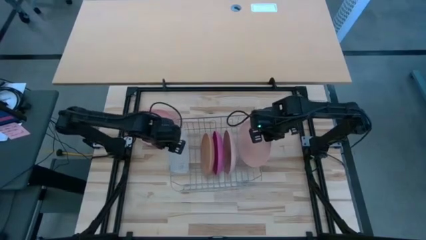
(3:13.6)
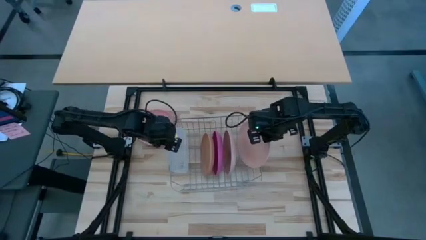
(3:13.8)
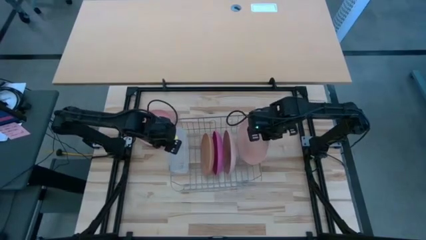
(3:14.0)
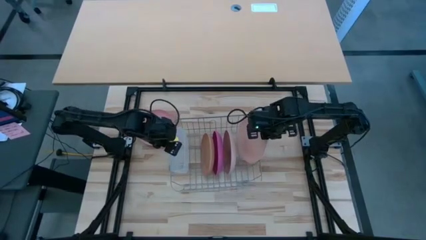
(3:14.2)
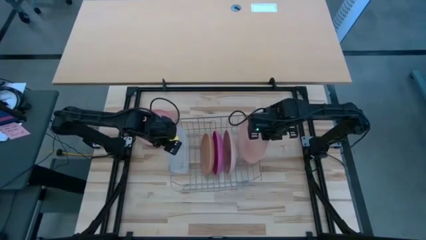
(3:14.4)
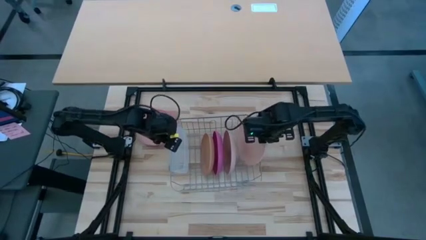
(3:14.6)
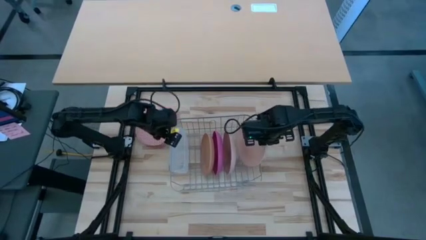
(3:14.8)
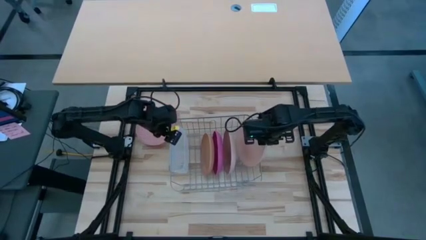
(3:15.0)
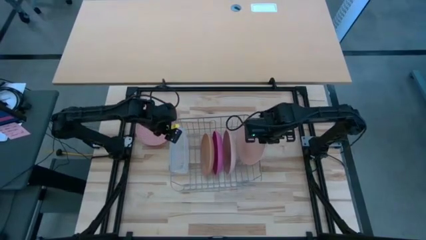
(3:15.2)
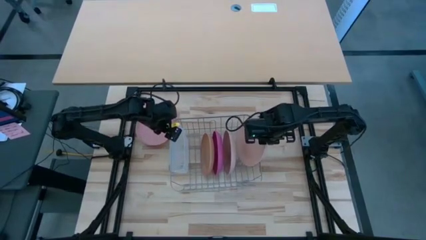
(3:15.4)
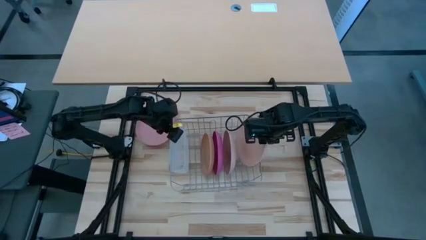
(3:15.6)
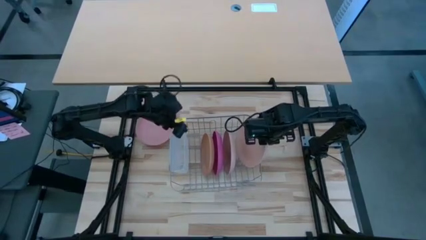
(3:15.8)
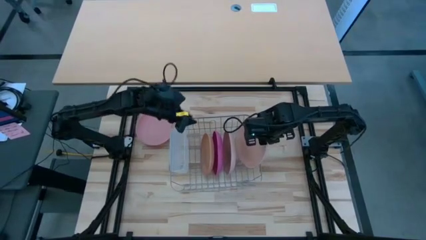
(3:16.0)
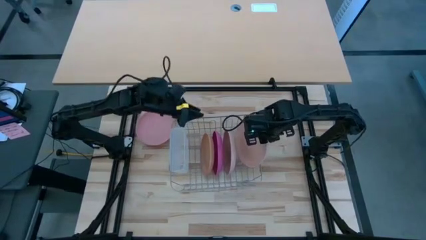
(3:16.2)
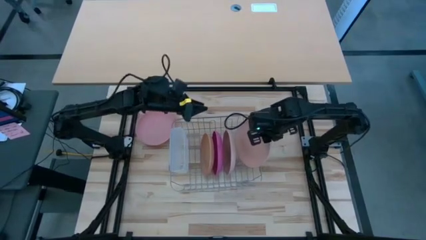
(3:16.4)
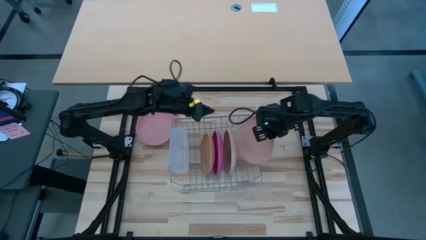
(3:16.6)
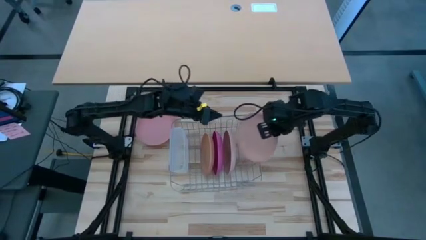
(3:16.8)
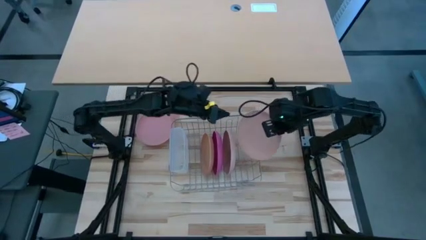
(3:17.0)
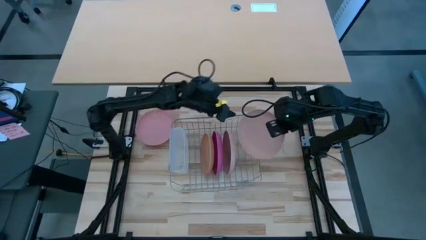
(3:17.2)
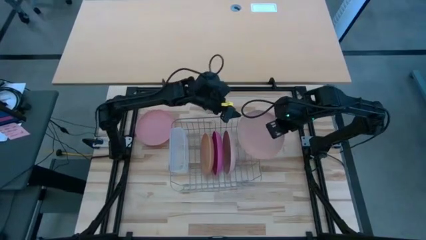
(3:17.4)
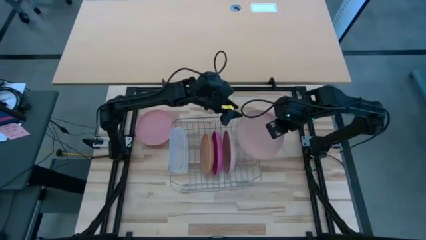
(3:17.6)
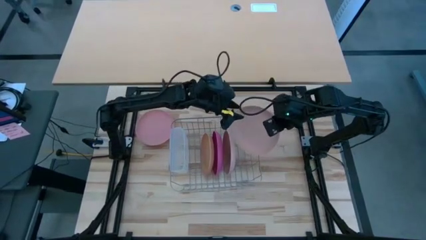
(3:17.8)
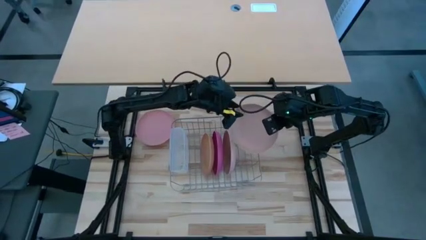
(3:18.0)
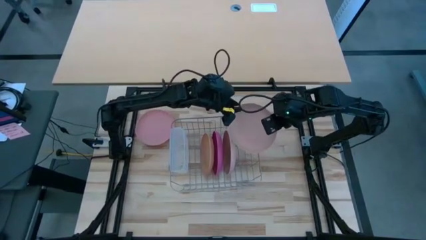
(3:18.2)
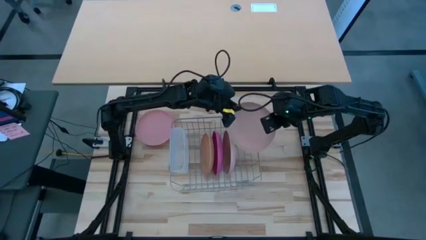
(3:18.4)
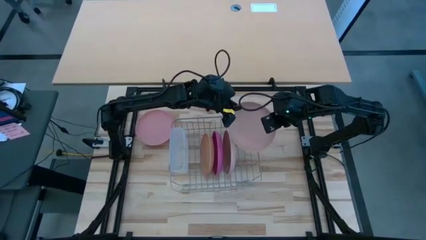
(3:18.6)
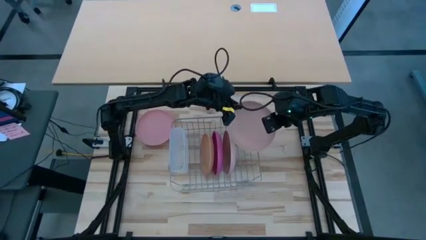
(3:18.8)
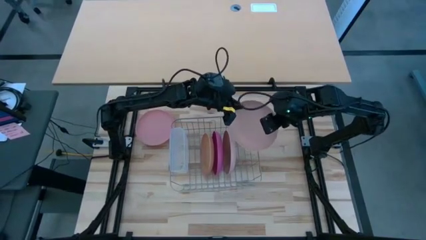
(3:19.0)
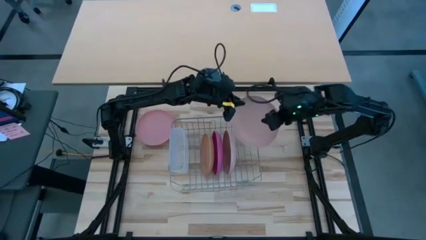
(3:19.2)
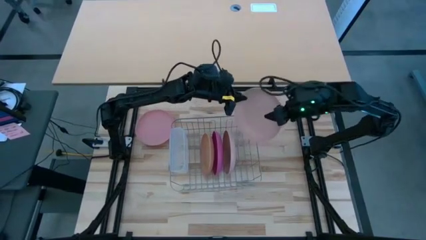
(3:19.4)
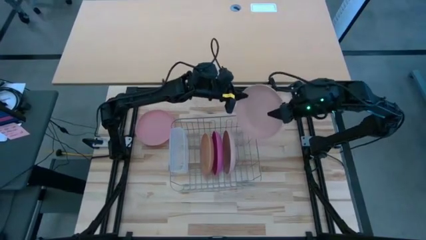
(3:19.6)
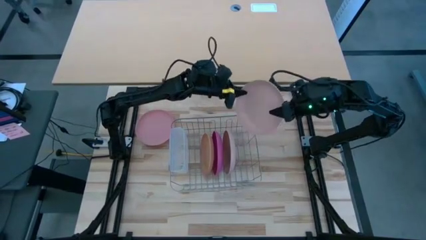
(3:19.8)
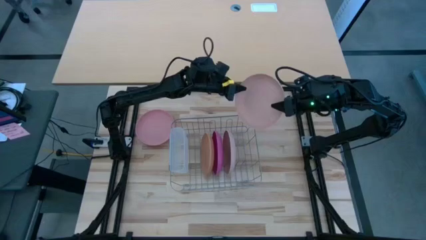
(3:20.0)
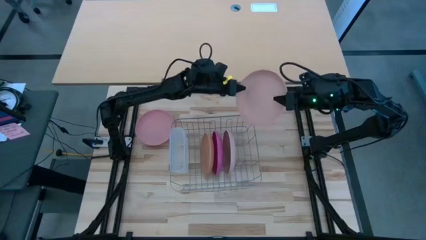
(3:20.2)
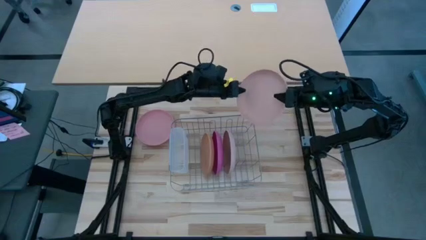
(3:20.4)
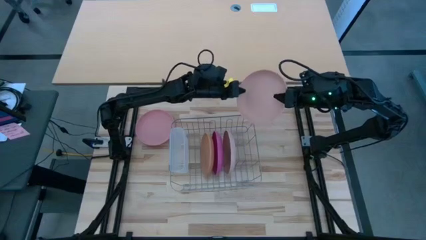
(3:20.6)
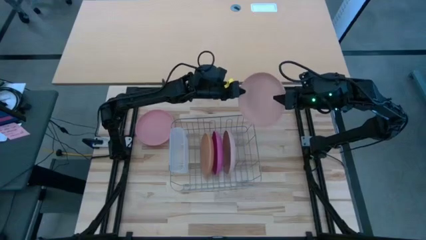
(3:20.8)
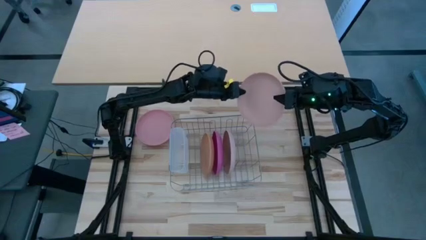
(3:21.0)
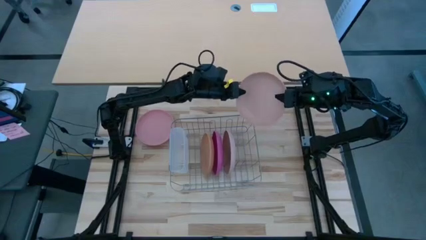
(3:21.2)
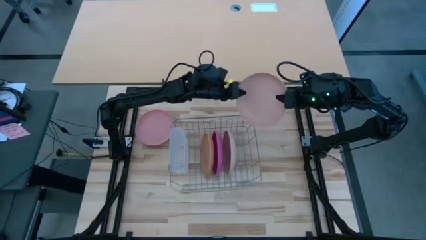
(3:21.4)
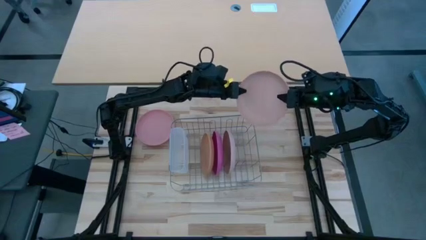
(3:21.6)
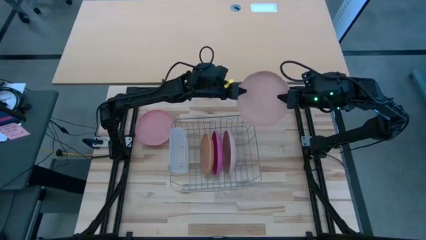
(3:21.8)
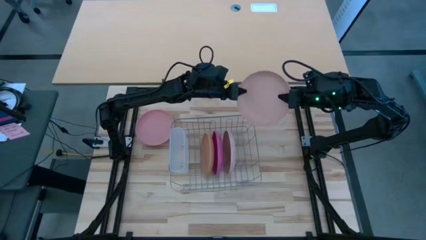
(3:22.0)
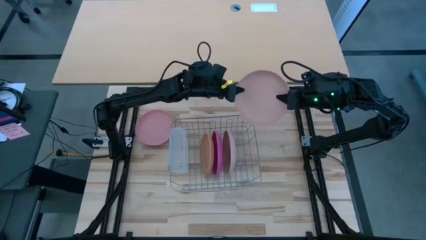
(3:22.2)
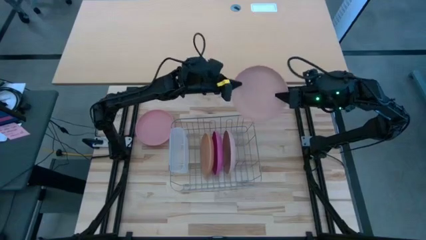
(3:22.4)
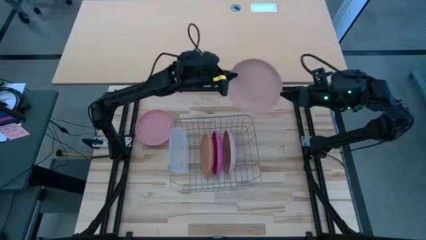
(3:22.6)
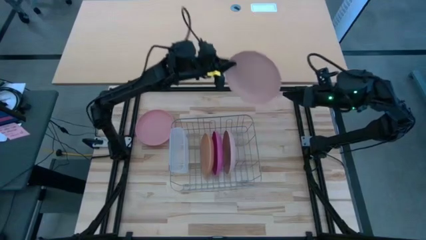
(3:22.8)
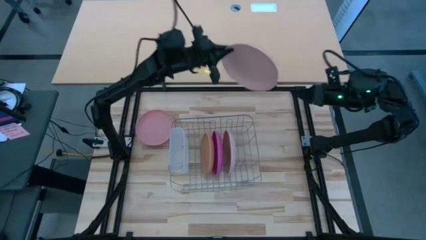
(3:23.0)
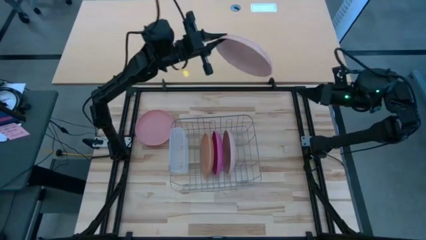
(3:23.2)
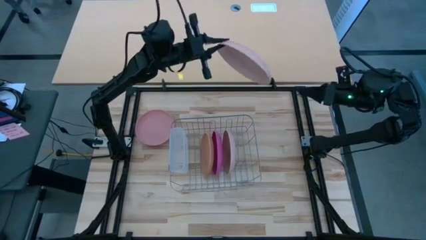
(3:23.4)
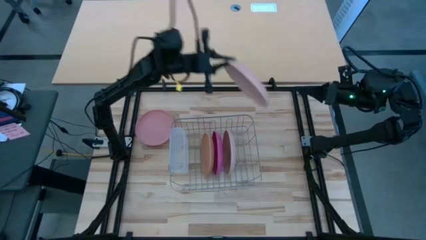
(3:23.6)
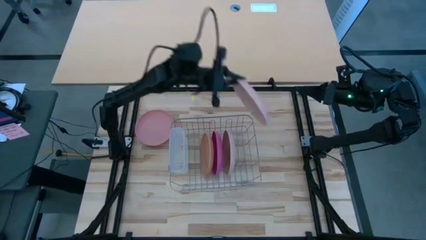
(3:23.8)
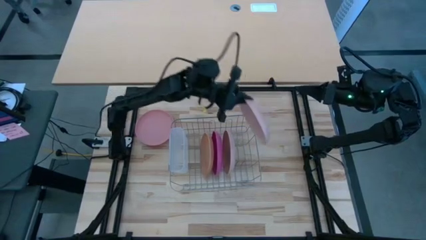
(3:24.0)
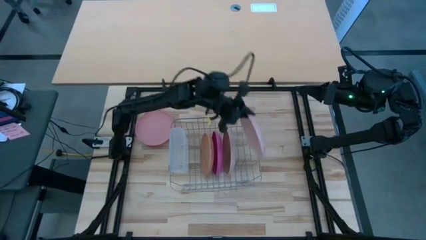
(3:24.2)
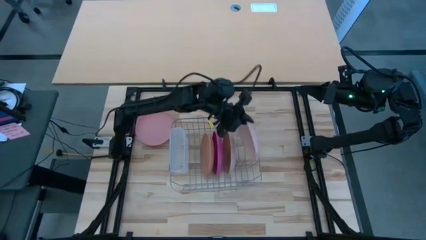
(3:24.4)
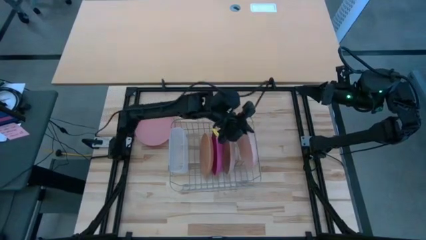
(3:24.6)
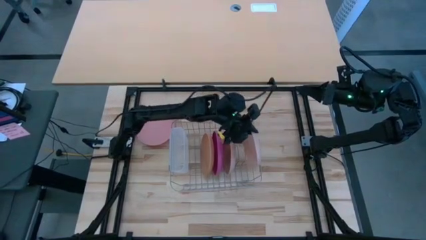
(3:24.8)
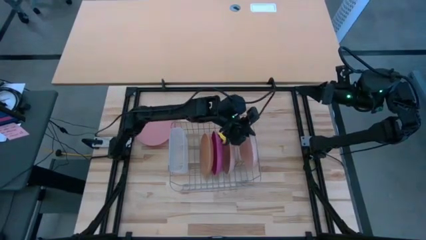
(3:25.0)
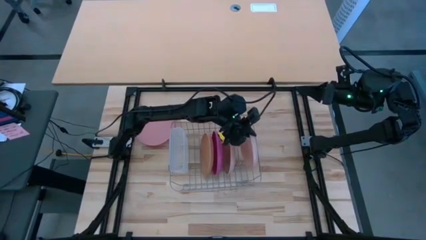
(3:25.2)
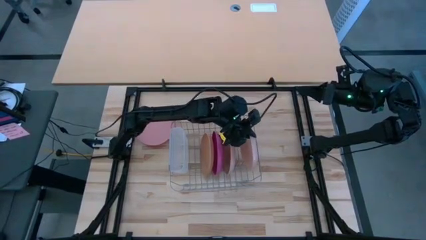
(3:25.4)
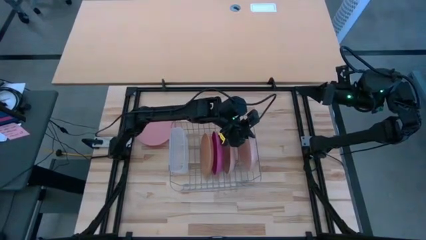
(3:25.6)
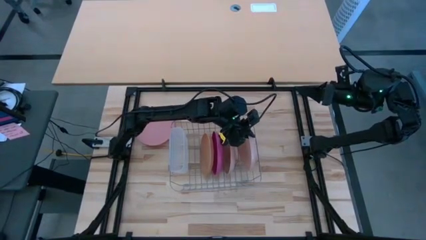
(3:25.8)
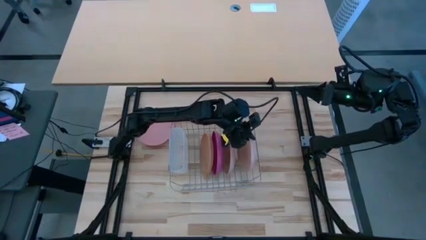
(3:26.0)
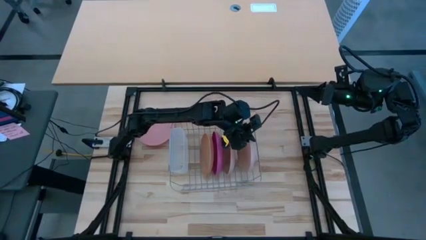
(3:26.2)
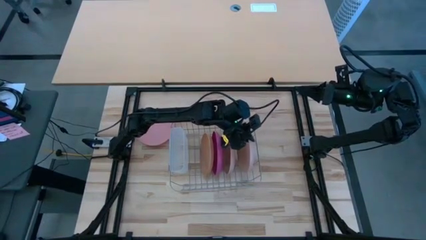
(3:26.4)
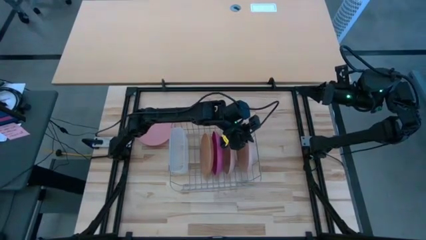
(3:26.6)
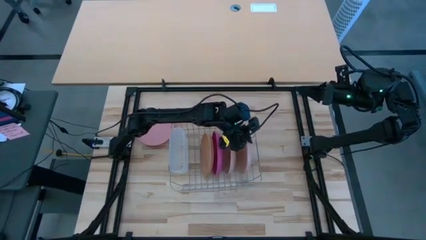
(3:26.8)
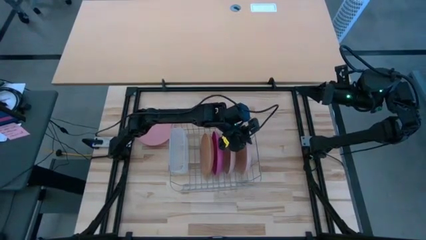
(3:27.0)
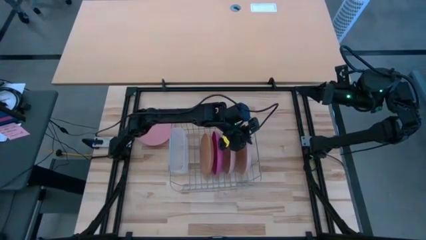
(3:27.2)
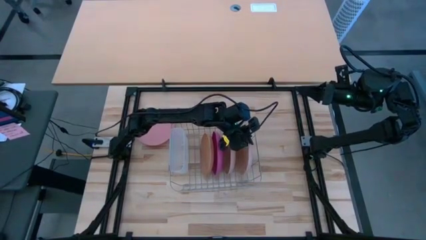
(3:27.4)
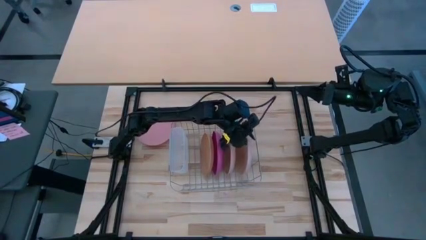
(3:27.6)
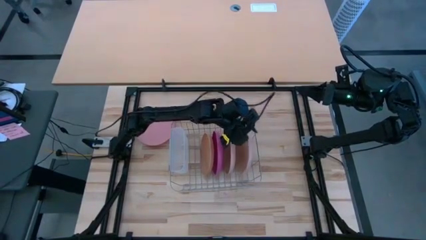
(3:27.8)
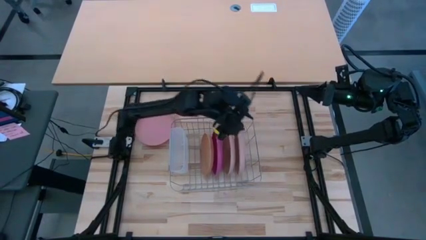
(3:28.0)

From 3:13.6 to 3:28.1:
Task: Sort dishes
Put the light orange plate in the dish rack

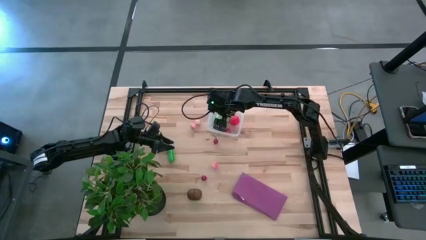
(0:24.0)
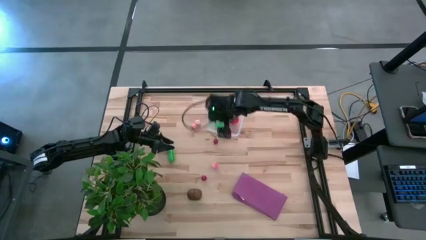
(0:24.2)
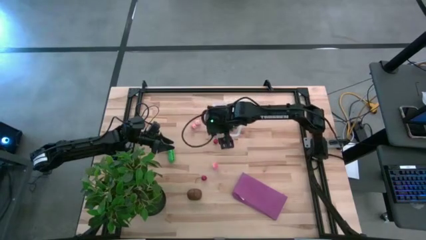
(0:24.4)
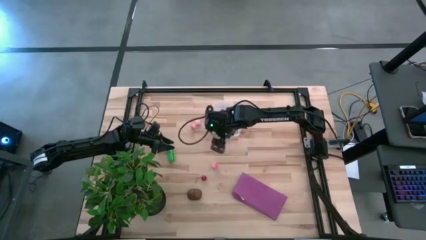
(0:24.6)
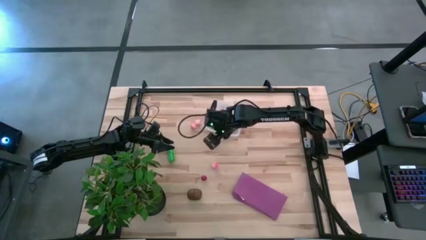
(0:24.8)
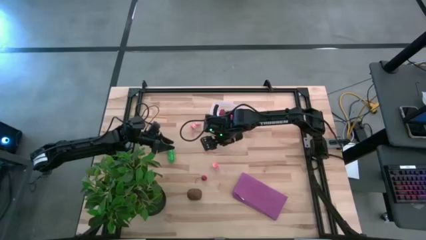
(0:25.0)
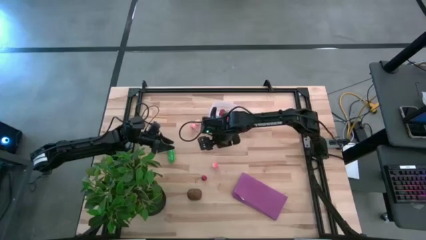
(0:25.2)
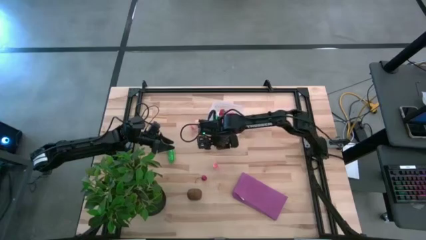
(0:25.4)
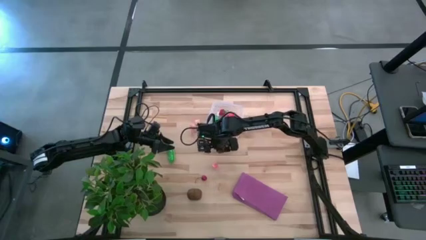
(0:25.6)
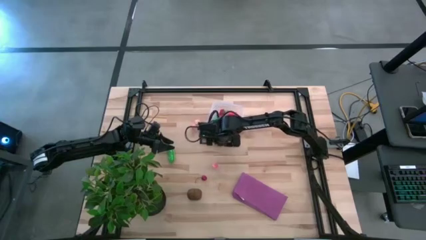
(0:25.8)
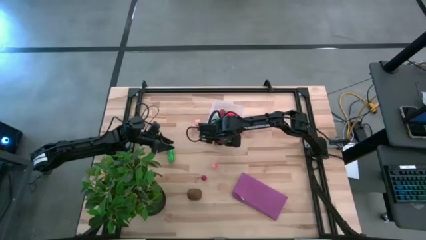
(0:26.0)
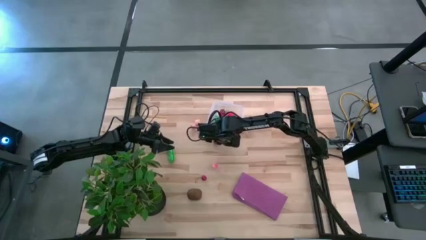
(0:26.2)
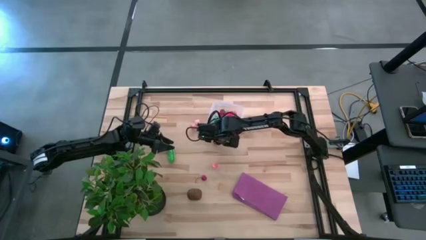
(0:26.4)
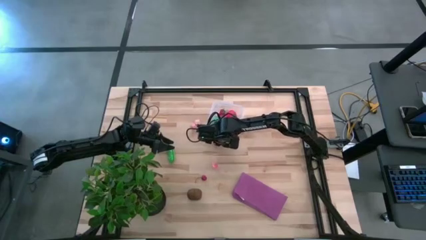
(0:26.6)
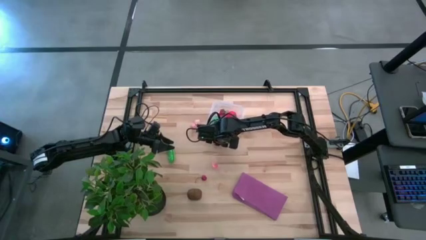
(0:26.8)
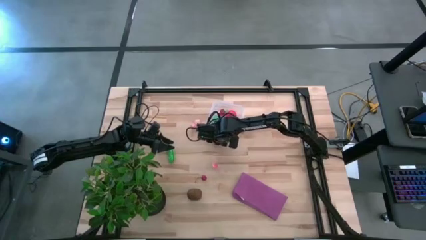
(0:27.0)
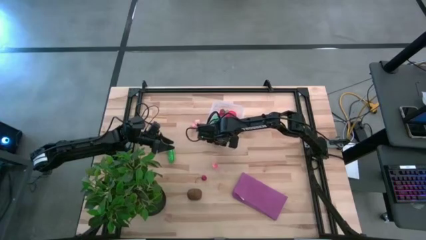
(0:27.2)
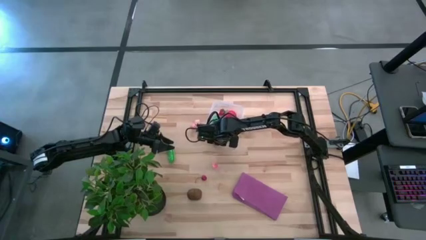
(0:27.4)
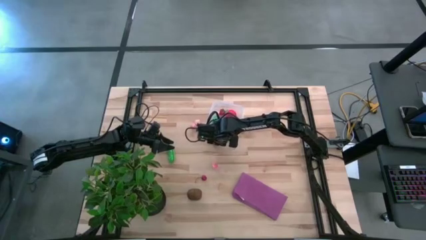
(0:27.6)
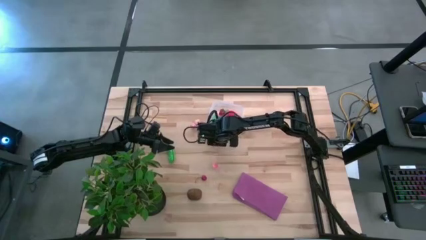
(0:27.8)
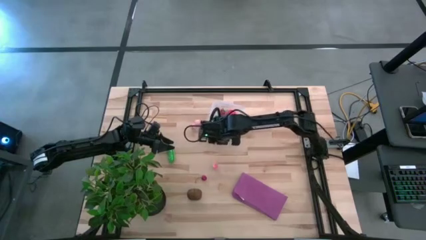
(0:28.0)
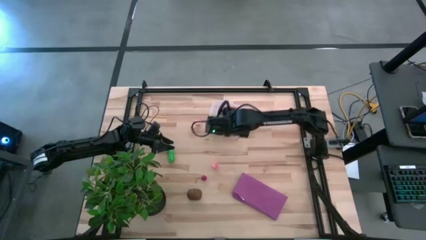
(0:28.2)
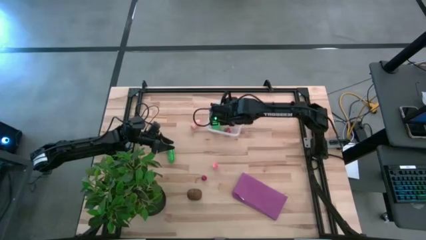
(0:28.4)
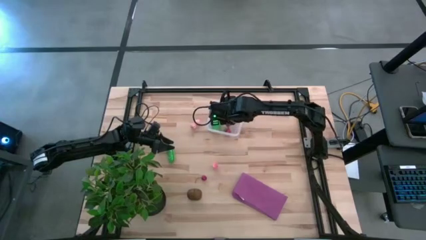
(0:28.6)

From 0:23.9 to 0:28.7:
Task: Pick and placing Produce into tupperware
Put the top red cherry in the transparent bin
